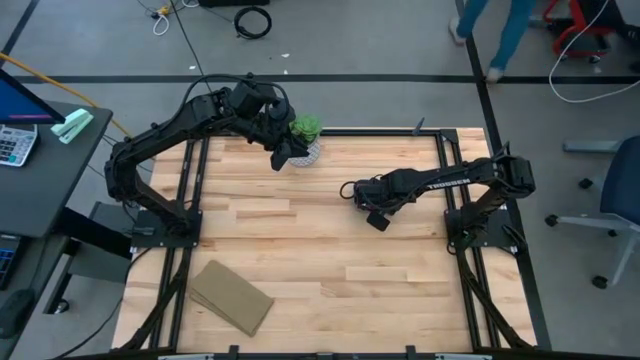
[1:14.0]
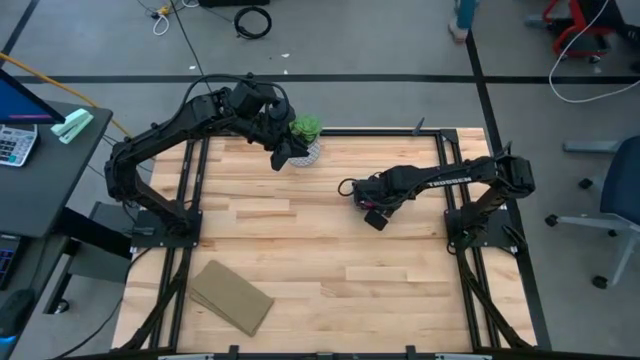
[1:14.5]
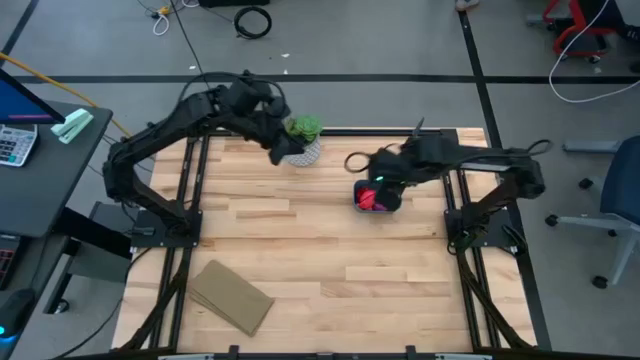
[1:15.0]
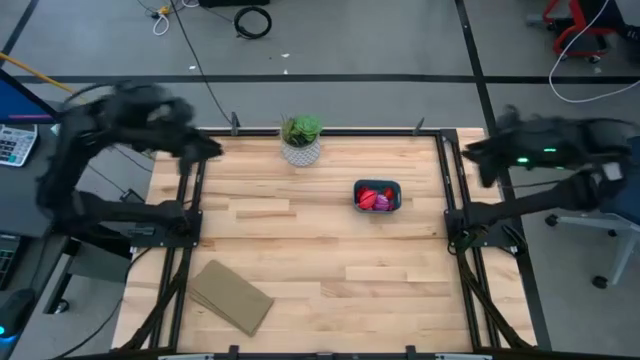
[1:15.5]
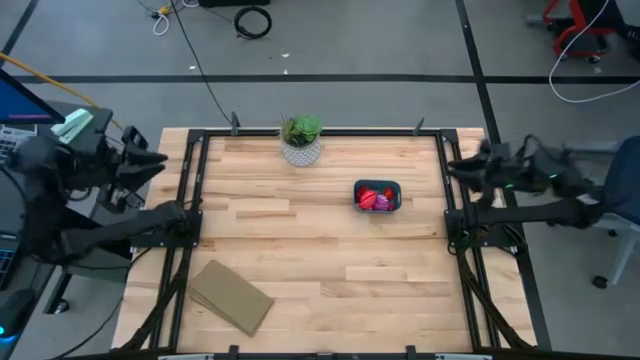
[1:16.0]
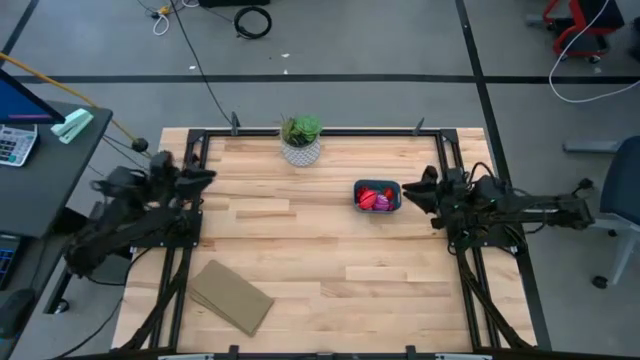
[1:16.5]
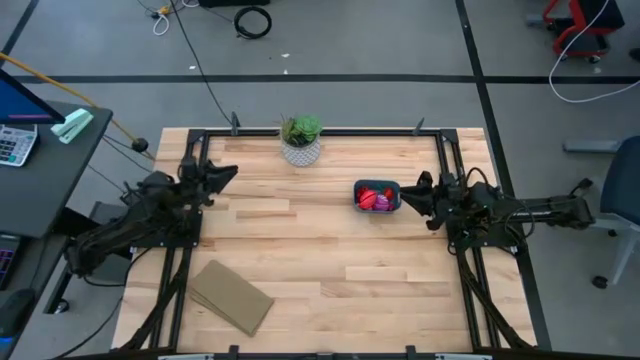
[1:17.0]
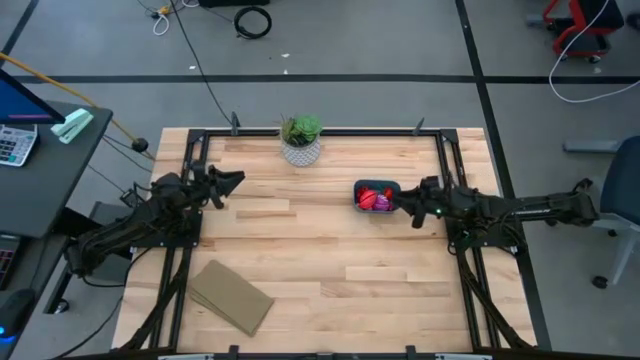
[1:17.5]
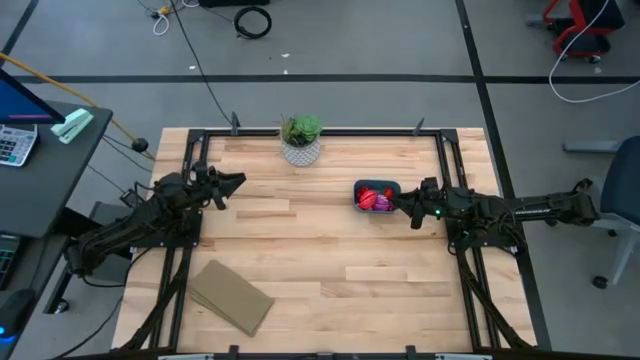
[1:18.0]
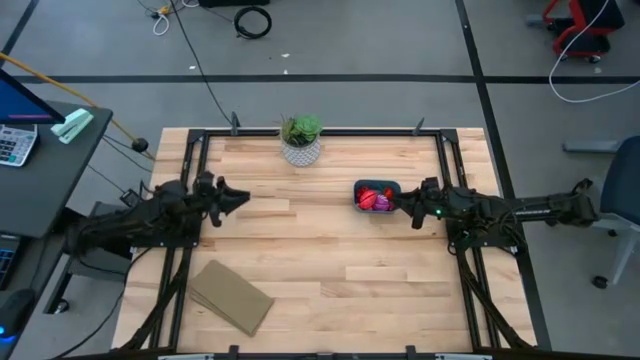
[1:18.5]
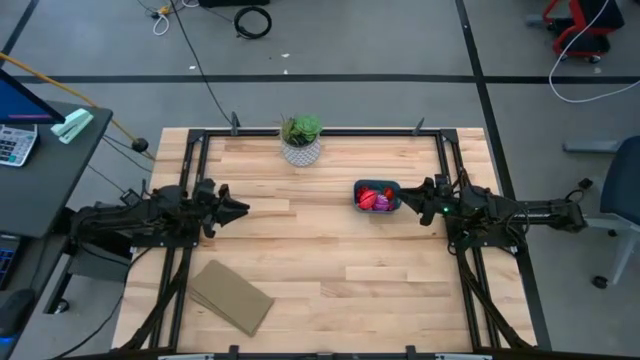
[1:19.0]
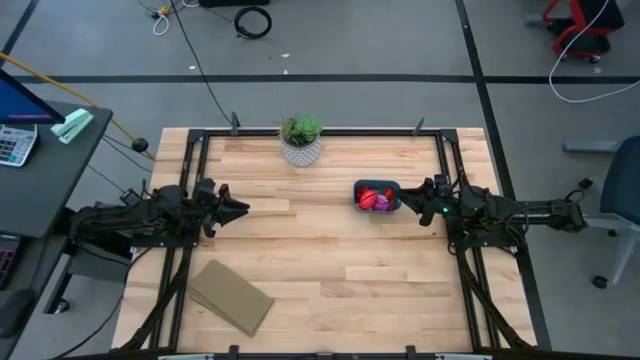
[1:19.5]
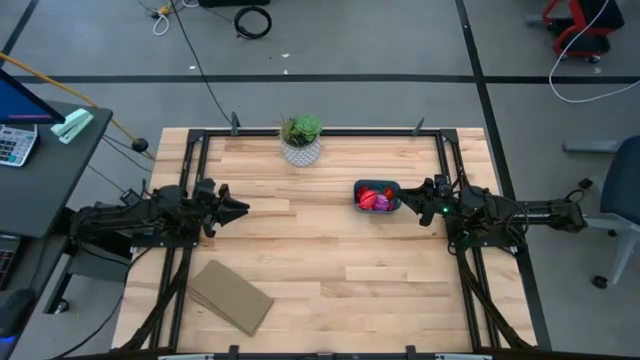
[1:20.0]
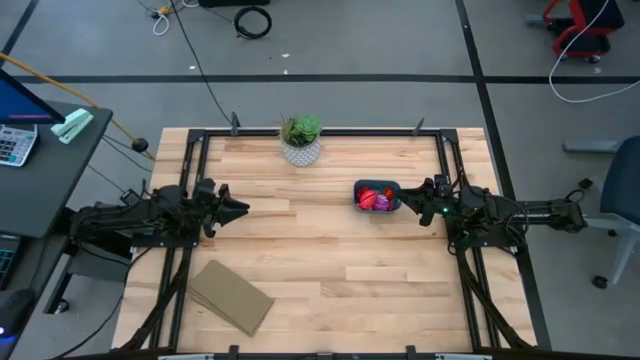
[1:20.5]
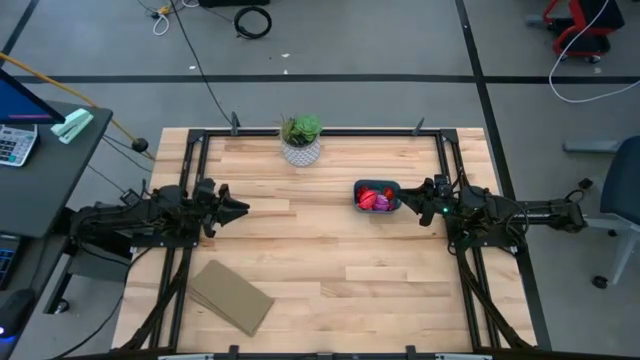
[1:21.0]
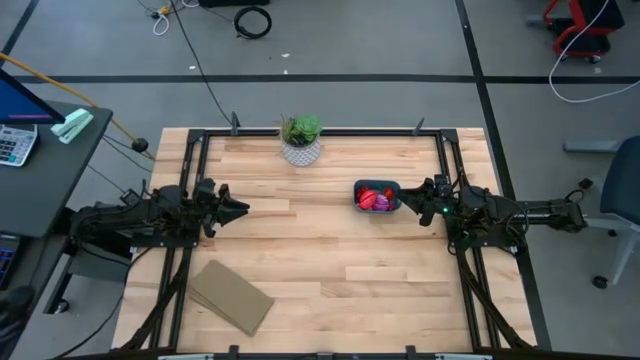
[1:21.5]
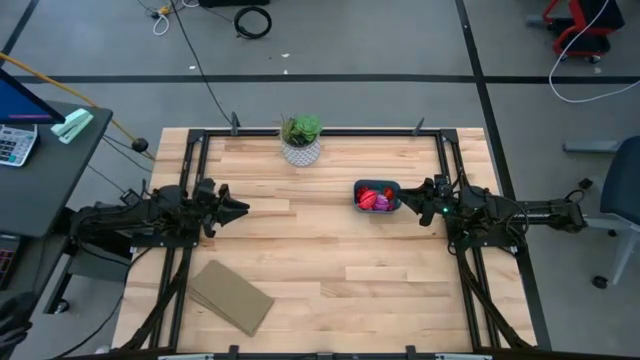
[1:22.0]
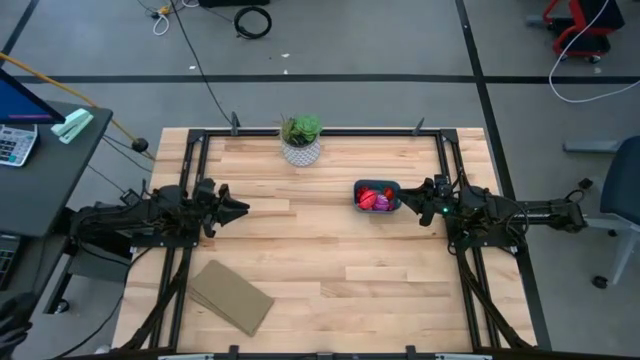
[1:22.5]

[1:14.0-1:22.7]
Task: Pick and placing Produce into tupperware
Return to Home Position

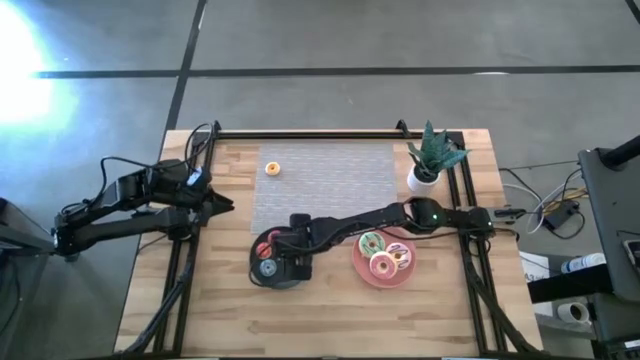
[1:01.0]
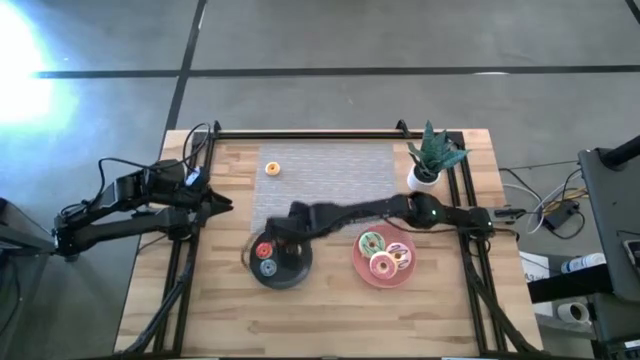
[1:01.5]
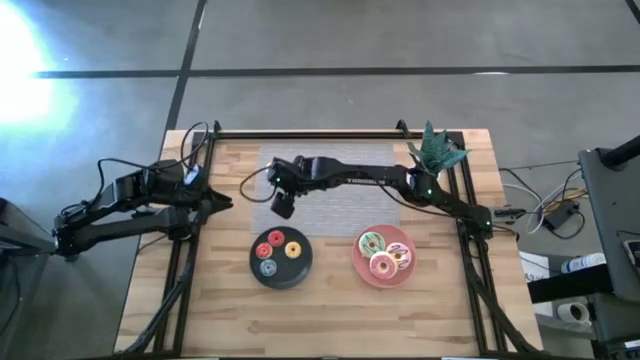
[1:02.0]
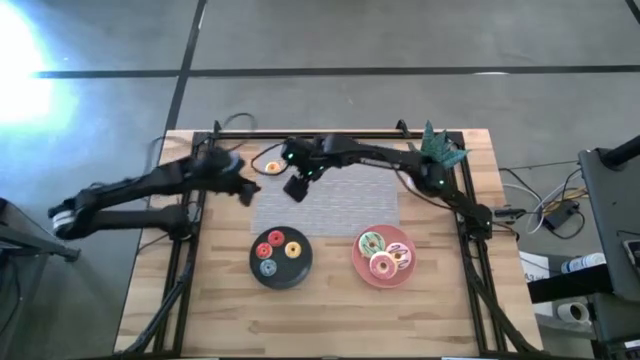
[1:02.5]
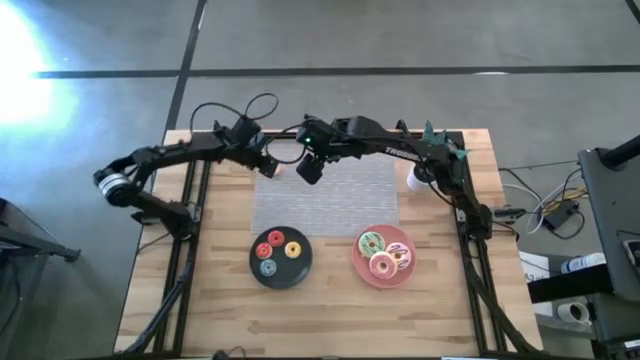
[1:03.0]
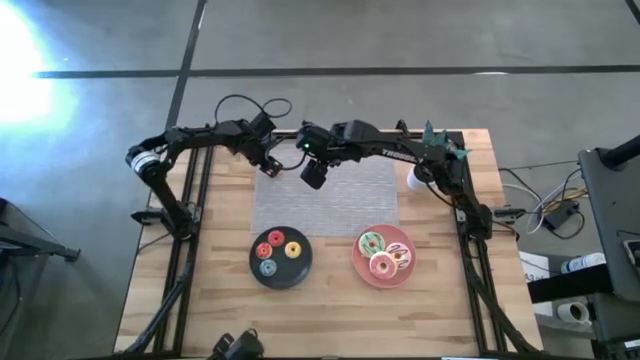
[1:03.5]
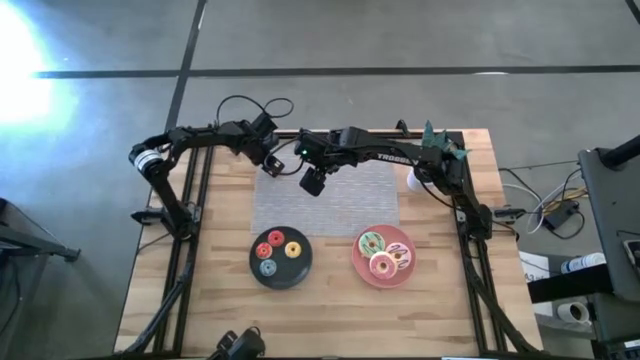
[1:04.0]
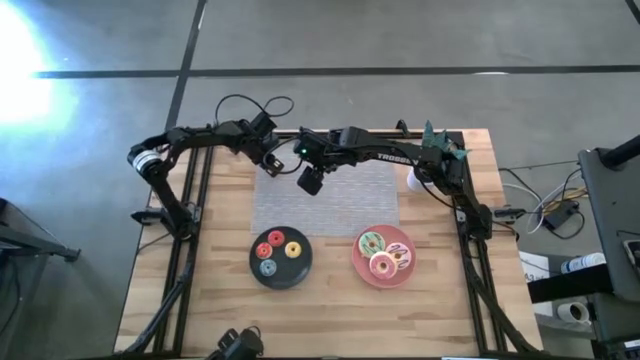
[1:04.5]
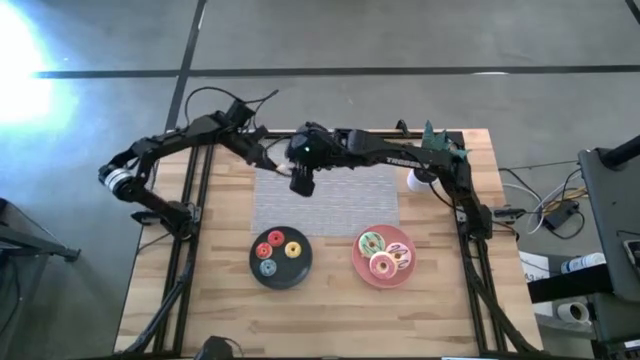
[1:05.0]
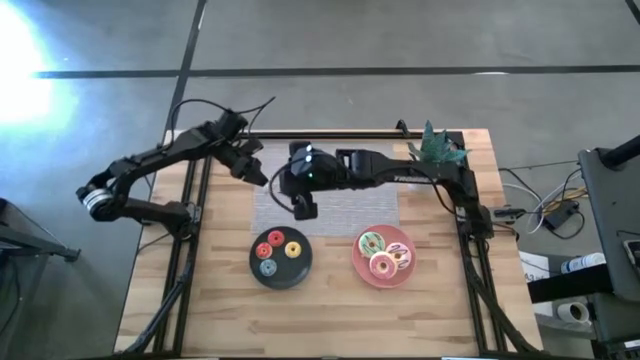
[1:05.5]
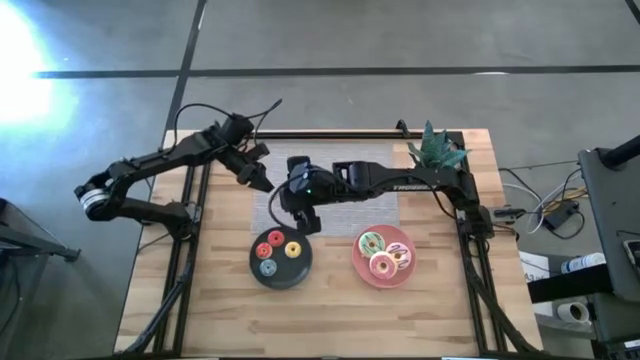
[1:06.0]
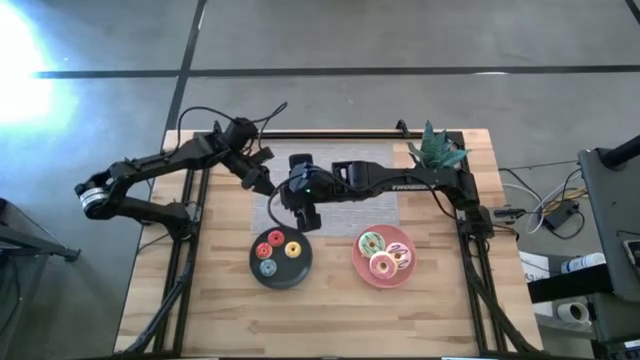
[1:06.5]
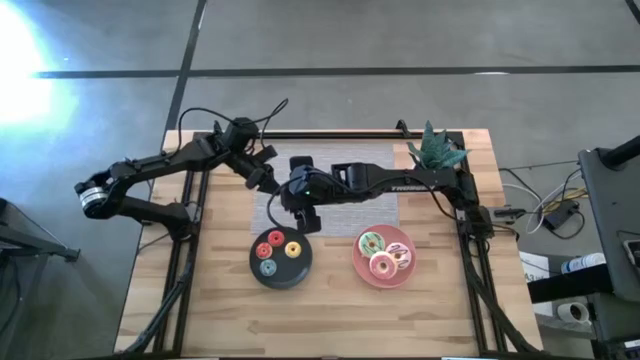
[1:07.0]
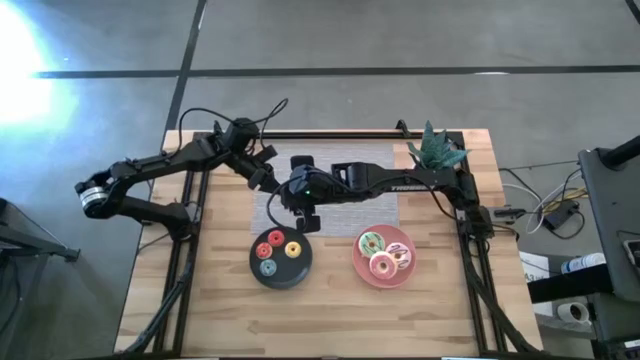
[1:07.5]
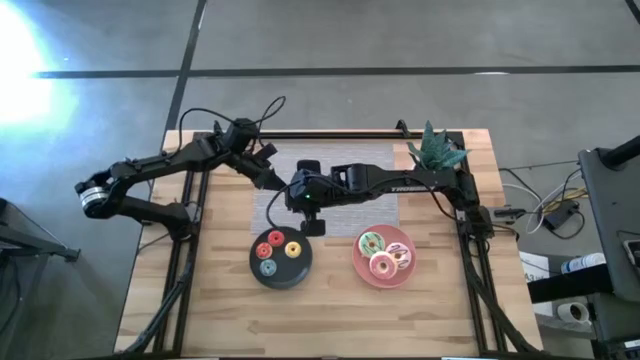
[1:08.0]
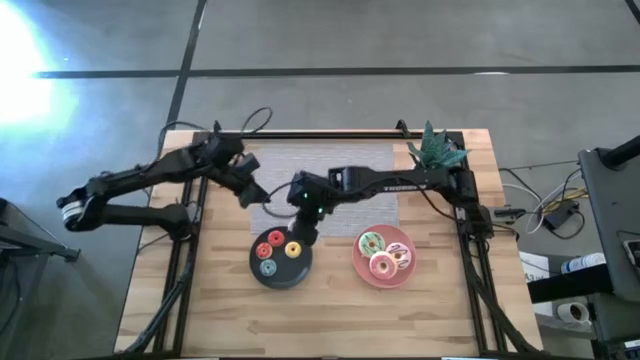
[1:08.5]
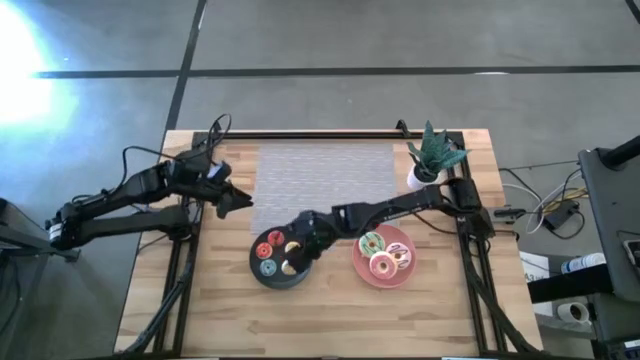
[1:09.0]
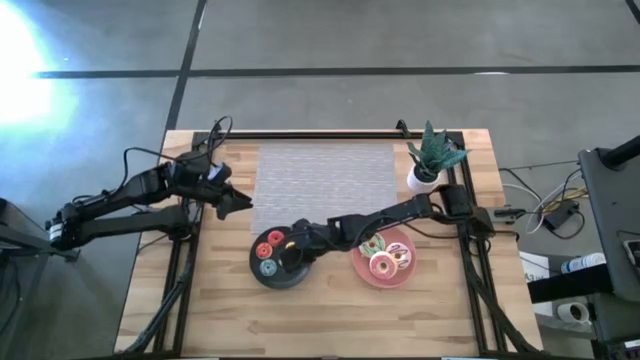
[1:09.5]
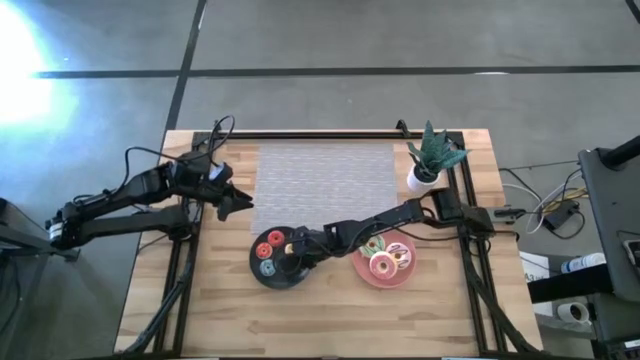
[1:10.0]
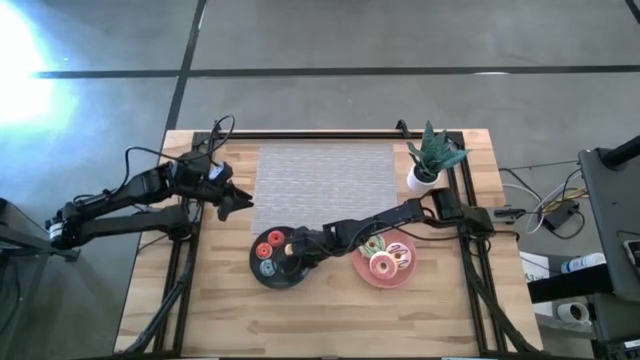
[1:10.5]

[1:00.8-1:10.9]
Task: Pick & Place donuts
Put the small white donut on the black plate

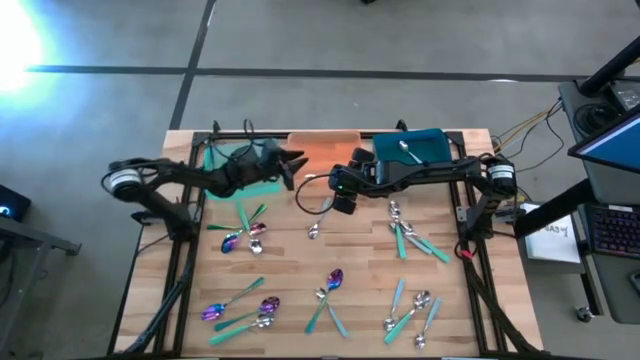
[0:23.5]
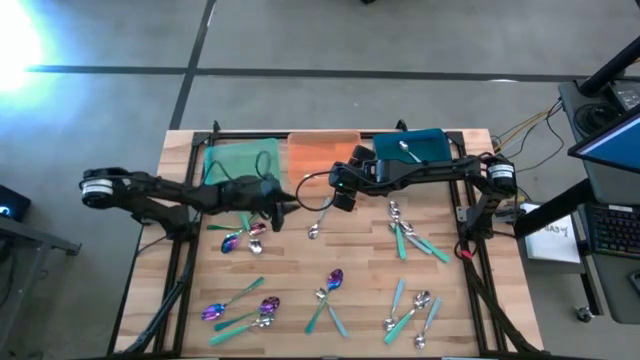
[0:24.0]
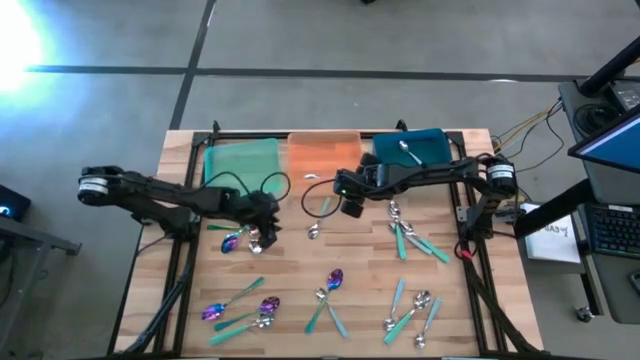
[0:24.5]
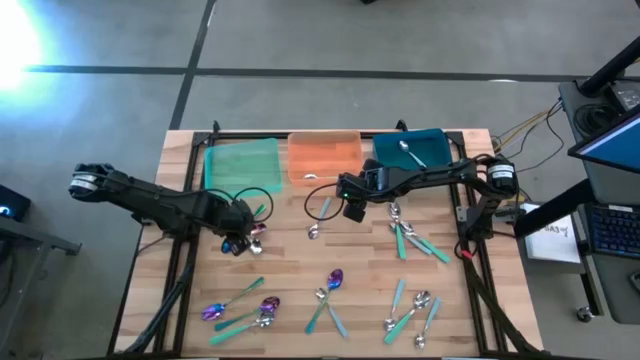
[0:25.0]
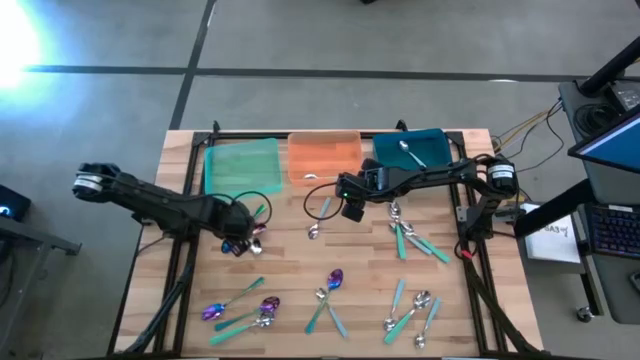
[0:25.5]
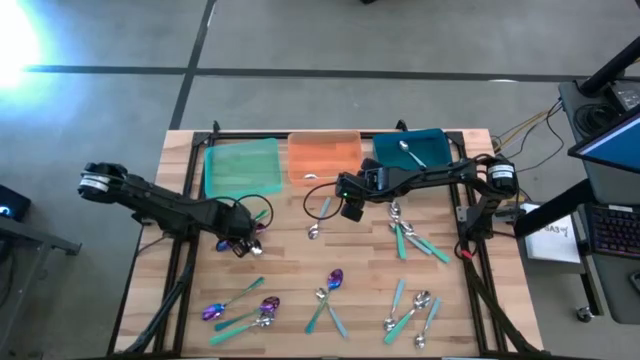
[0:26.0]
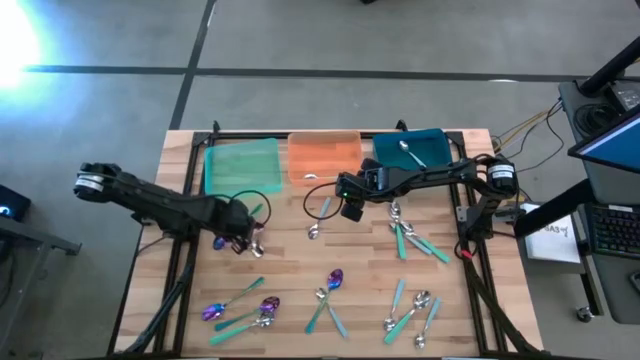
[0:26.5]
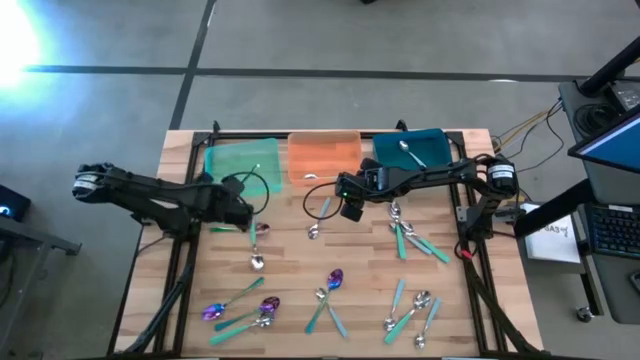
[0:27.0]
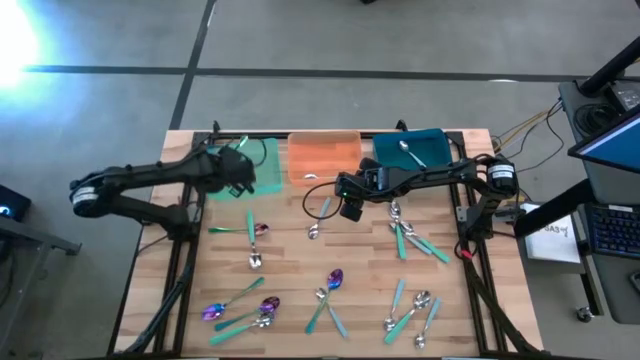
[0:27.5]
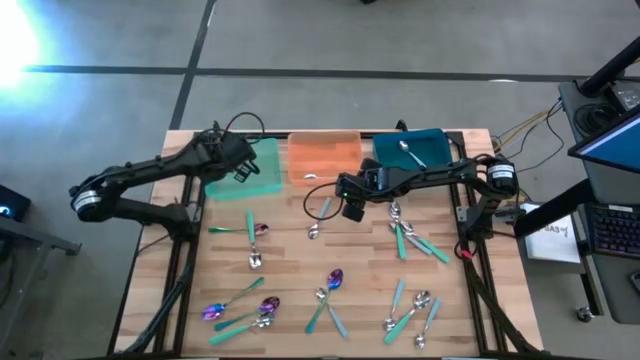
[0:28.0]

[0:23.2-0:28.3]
Task: Sort silverware by color (type)
Put the blue spoon into the green bin
